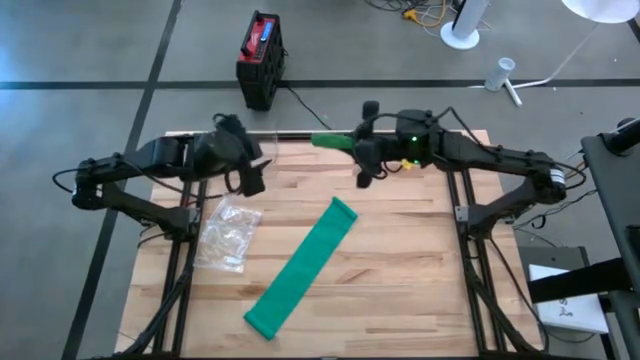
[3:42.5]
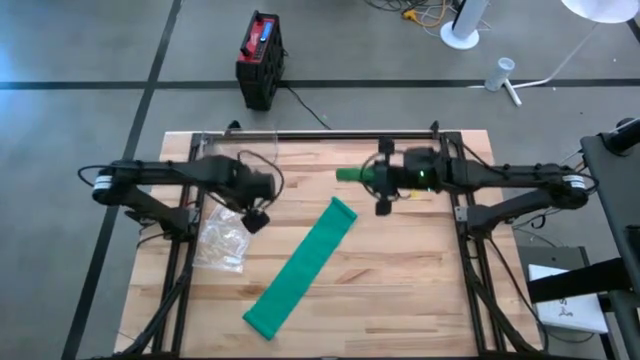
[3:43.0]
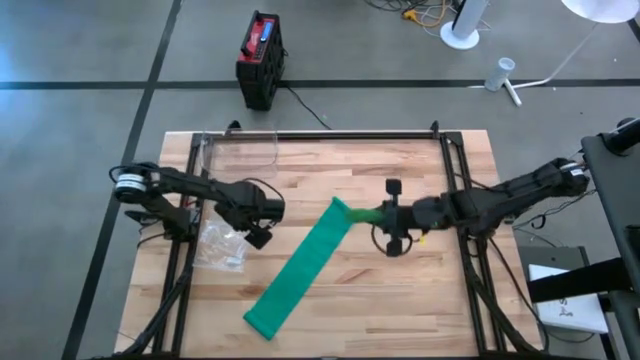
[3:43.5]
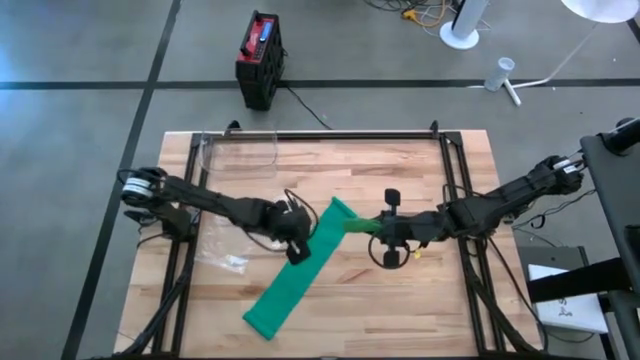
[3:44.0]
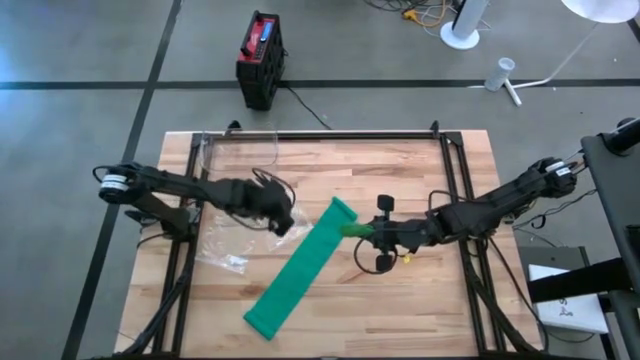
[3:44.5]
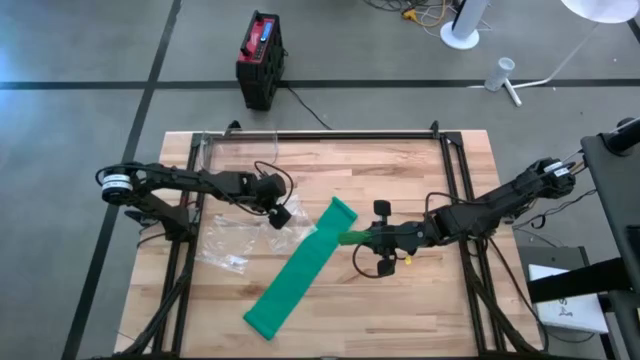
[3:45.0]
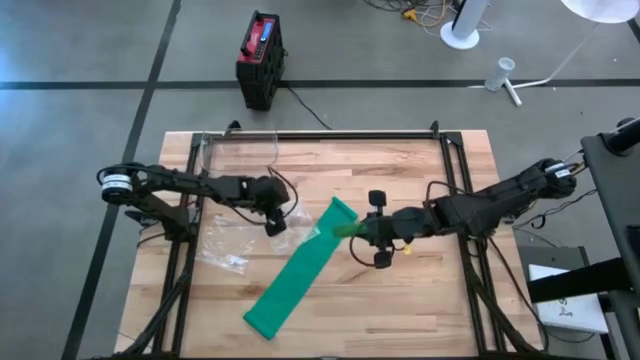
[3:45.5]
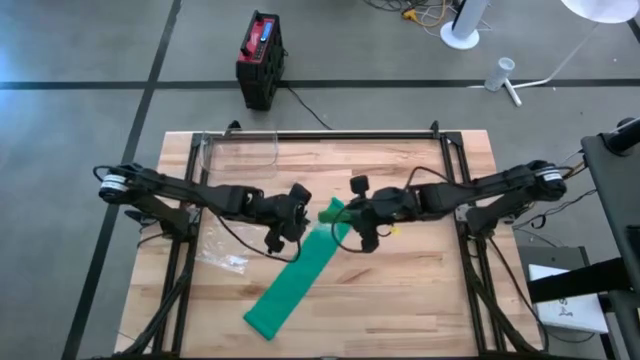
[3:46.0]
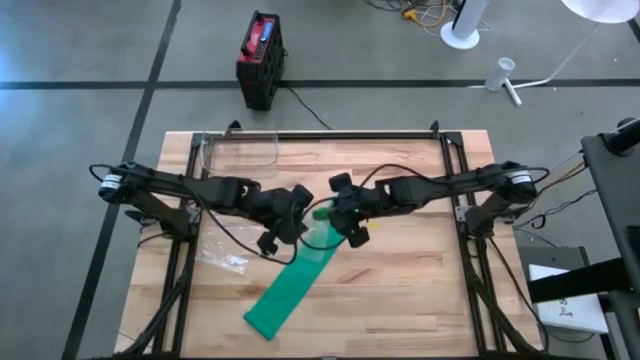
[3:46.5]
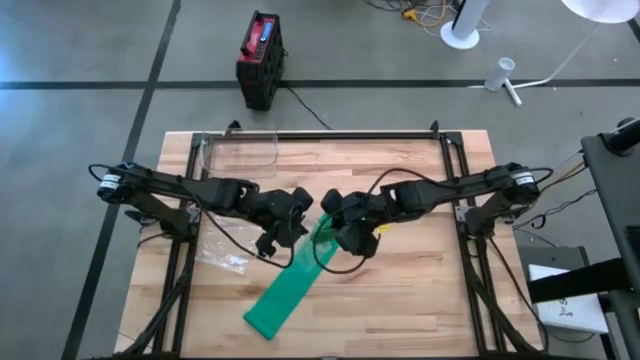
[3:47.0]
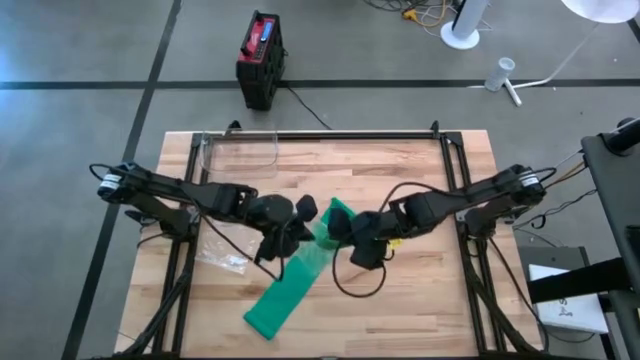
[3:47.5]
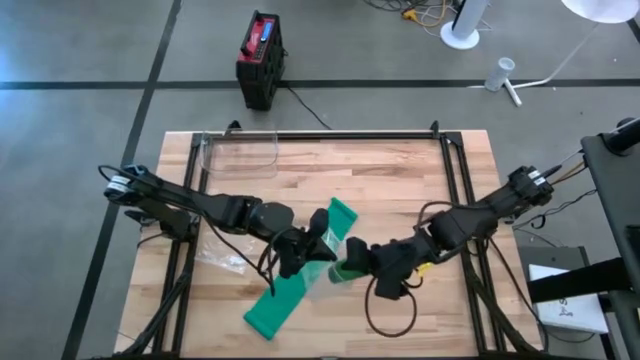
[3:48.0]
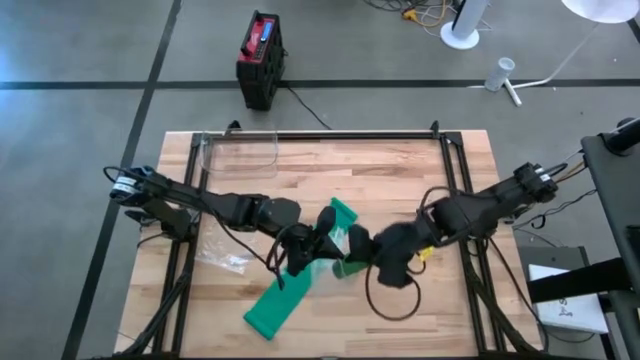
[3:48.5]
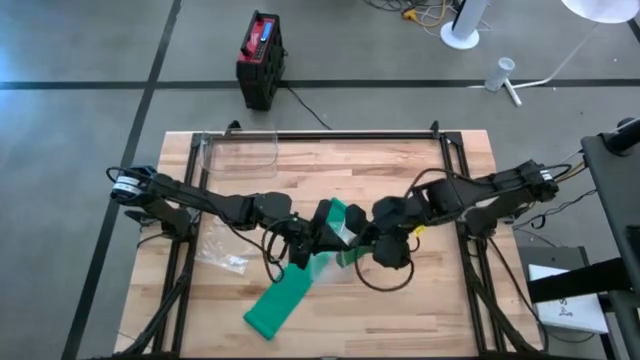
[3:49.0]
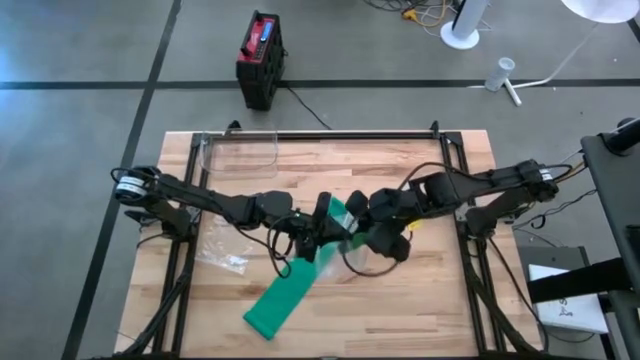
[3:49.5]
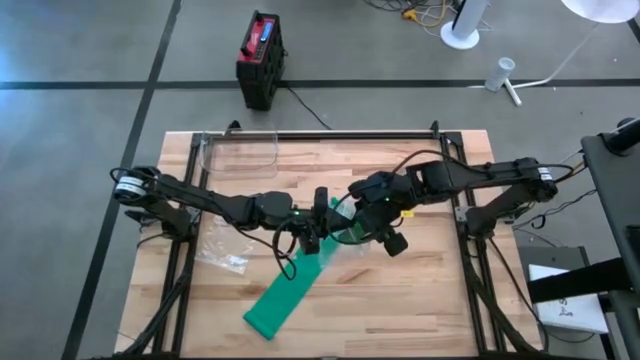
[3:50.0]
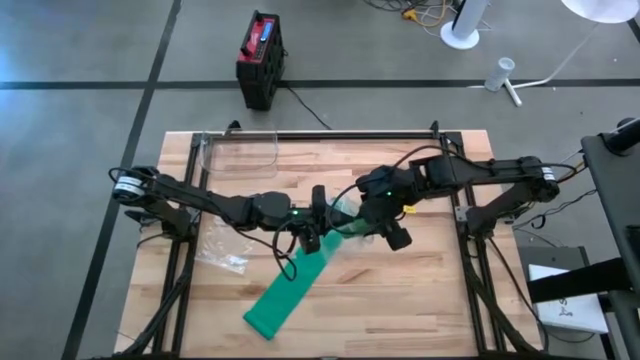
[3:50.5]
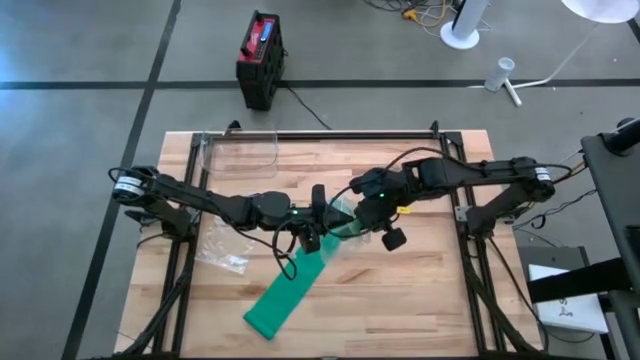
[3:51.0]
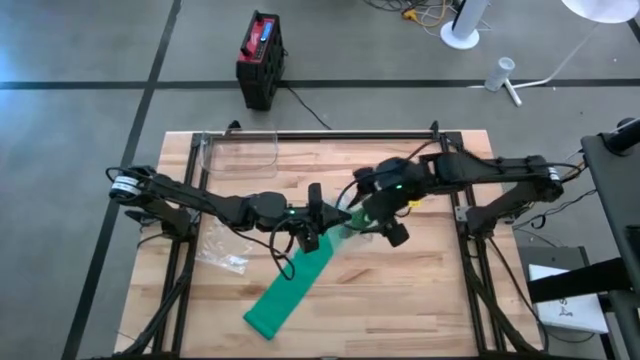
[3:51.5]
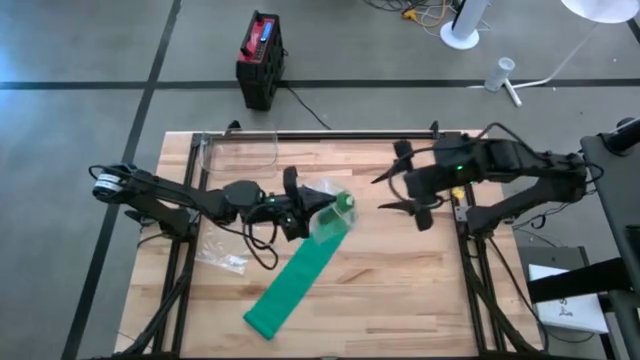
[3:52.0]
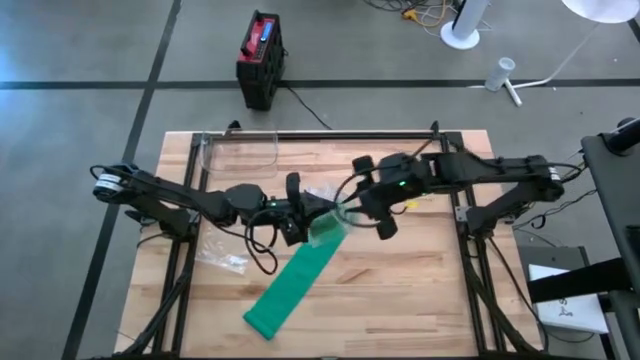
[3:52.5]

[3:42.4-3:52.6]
Task: Roll bandage
Put the folded green bandage into the transparent zip bag

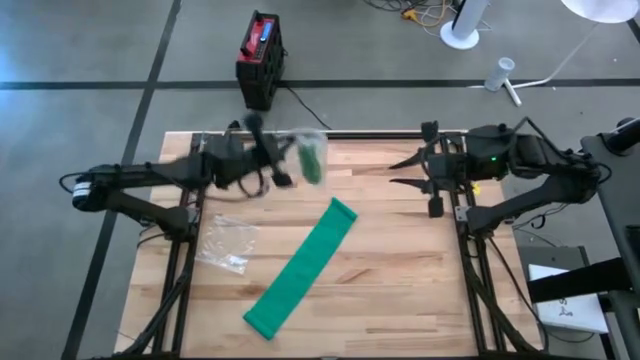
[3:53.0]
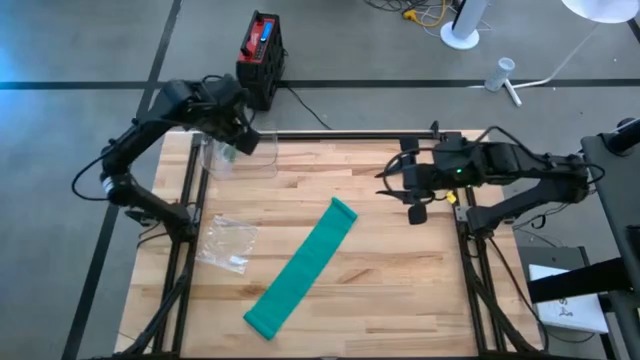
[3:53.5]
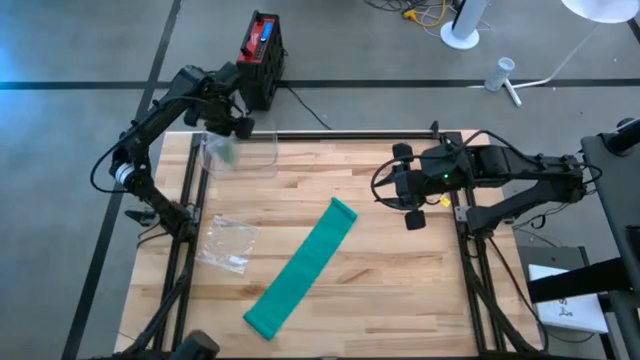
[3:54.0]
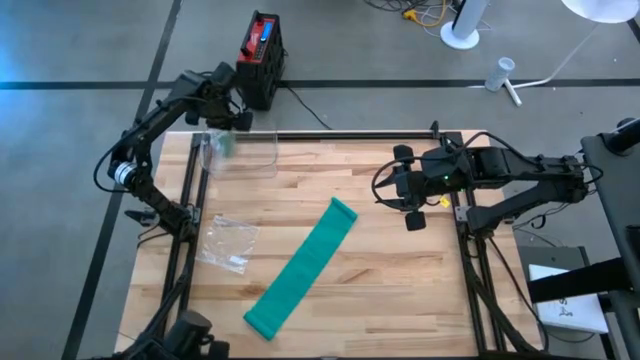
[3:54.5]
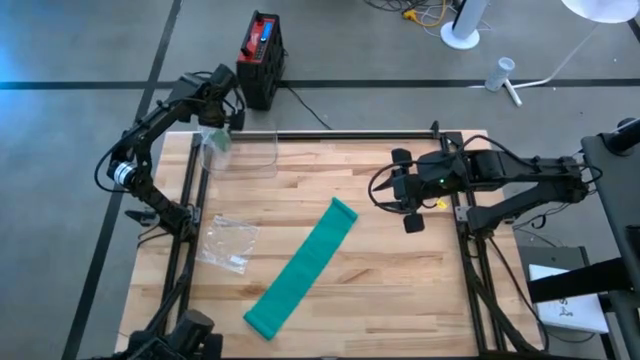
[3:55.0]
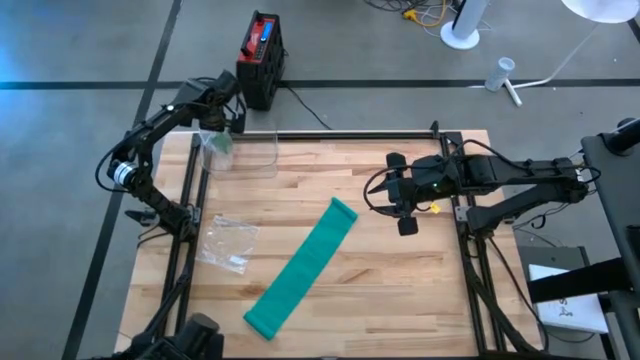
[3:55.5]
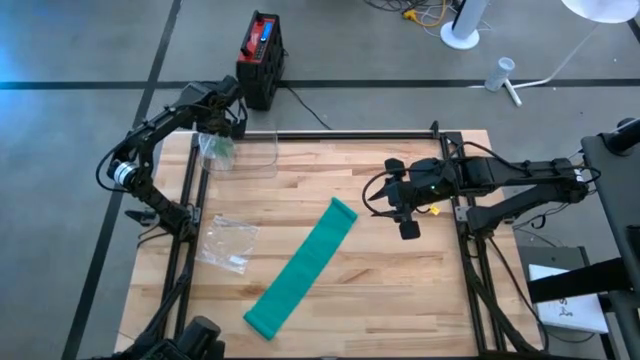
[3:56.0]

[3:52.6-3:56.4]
Put the transparent zip bag containing the green rolled bandage into the transparent bin

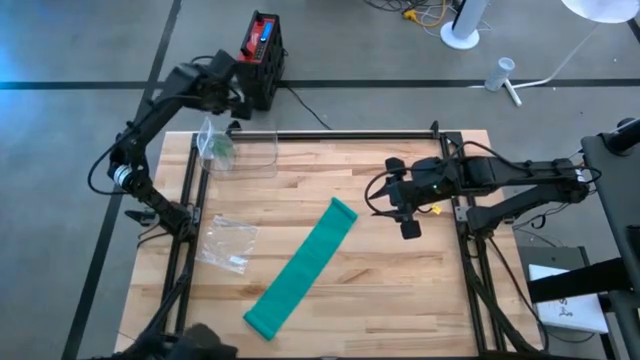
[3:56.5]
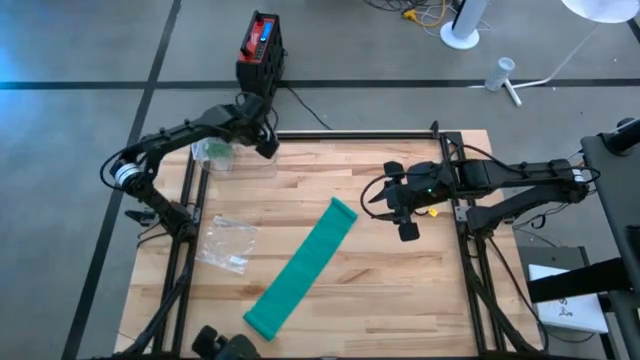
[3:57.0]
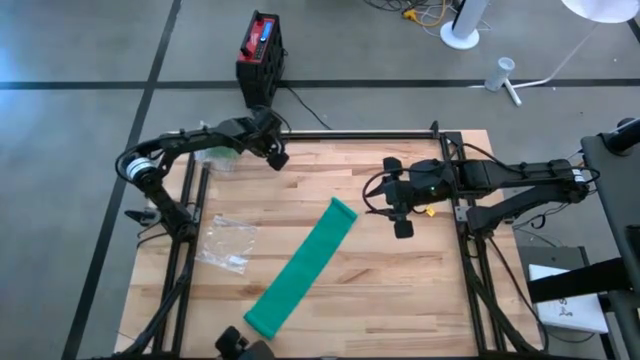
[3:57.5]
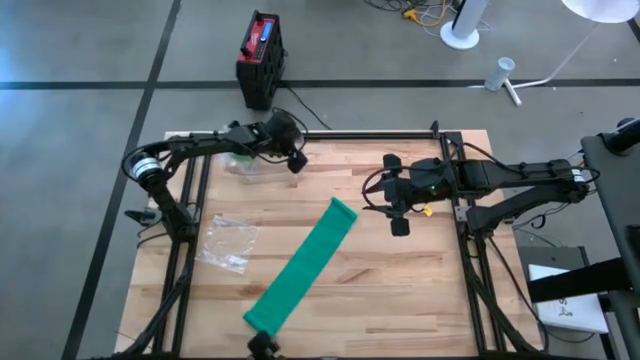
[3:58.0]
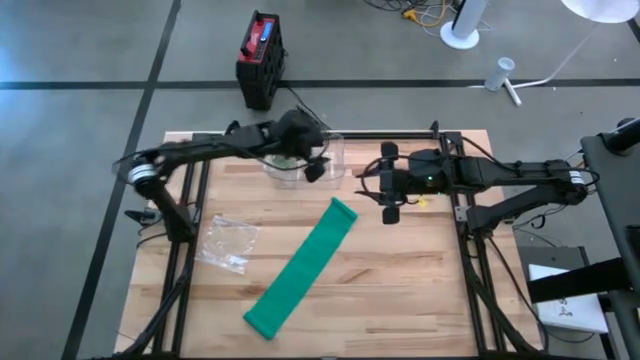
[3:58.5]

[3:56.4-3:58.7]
Move the transparent bin to the top center of the table
